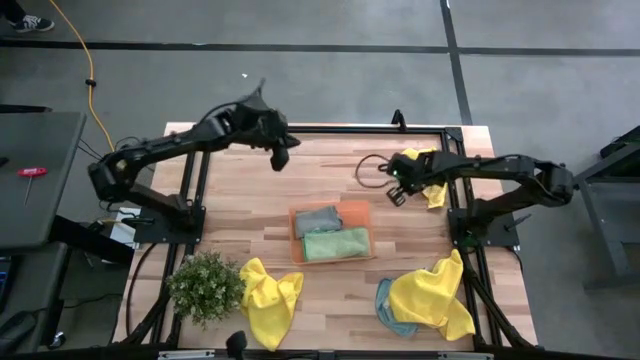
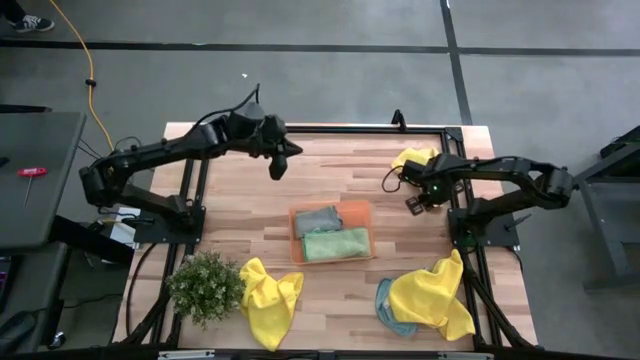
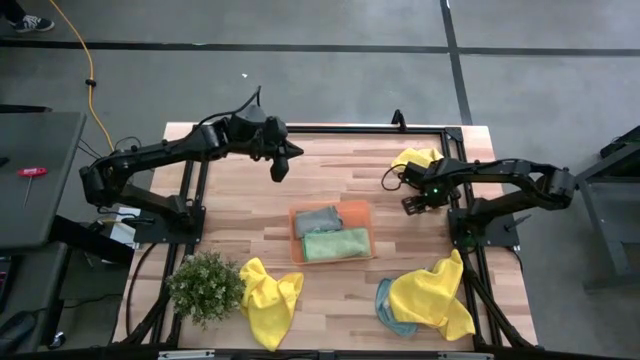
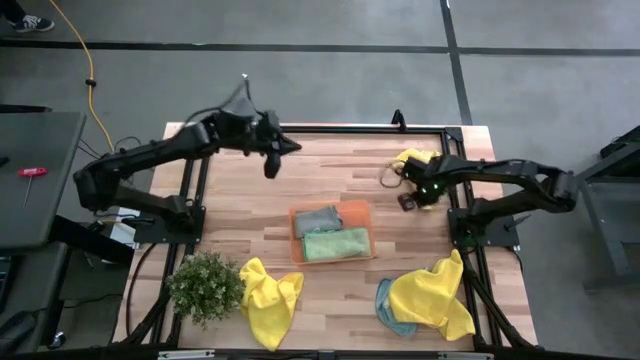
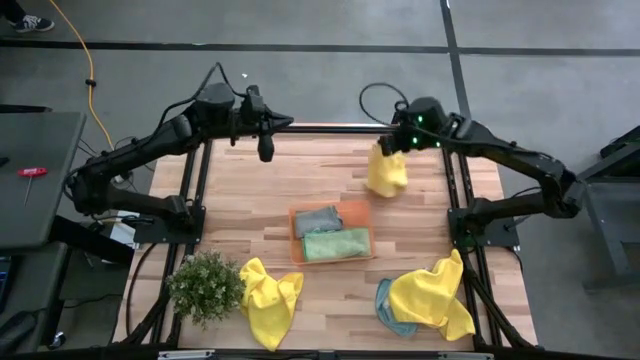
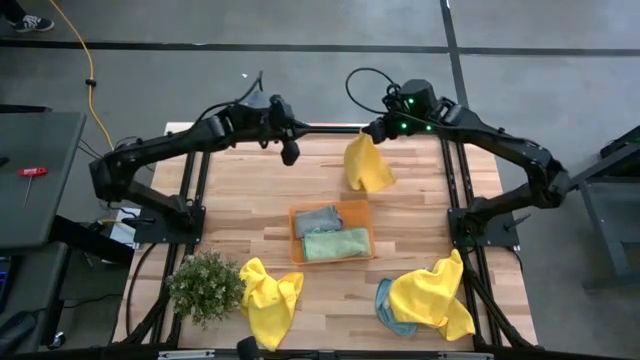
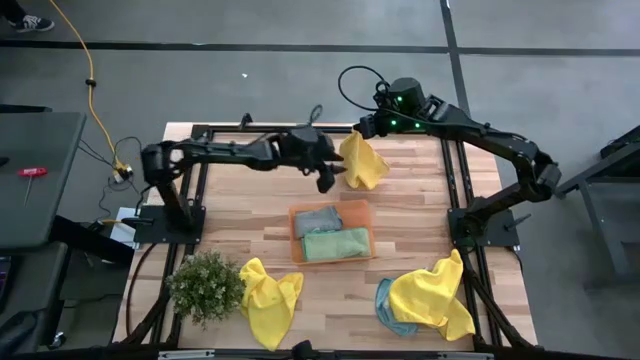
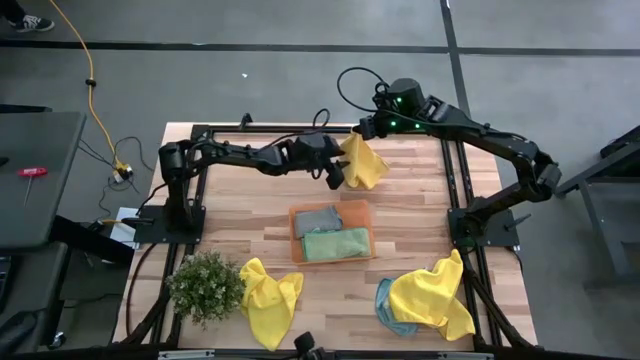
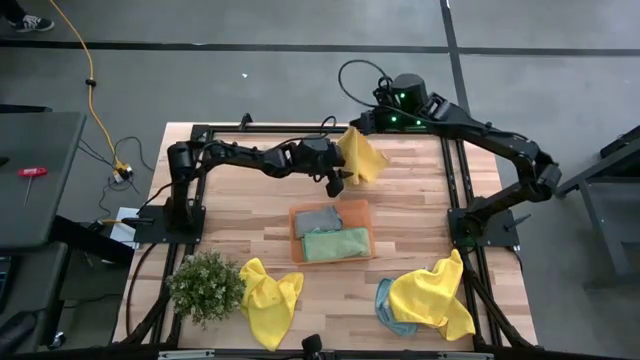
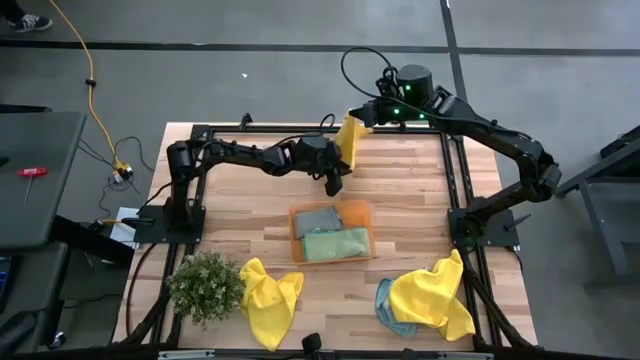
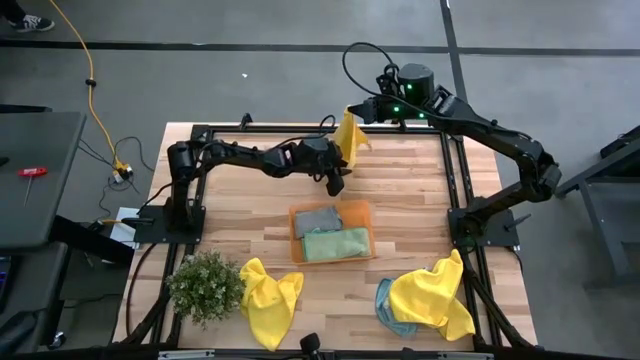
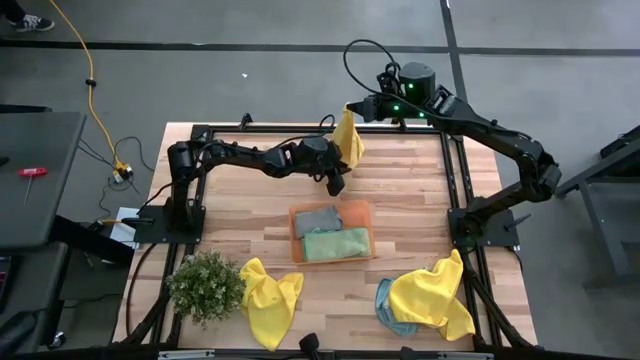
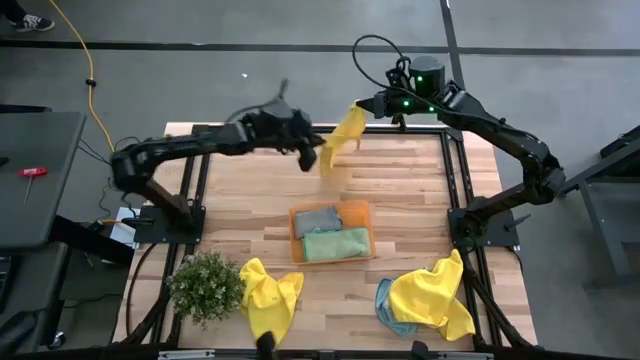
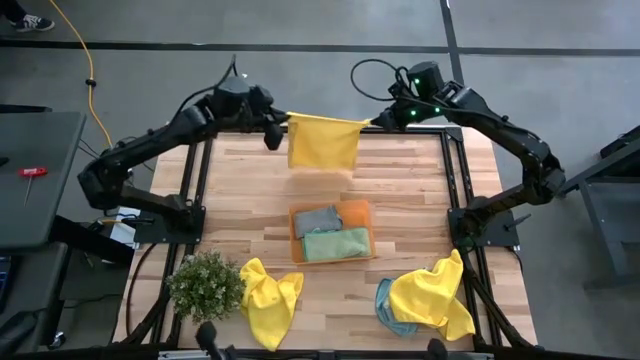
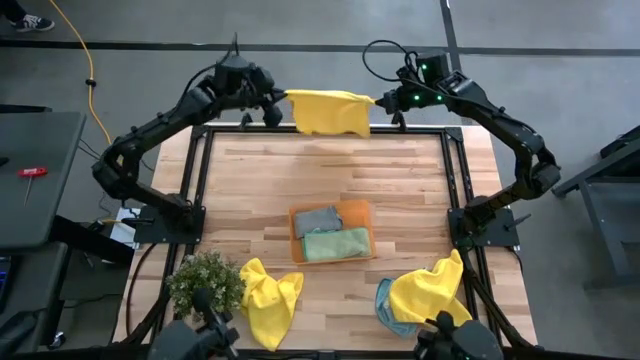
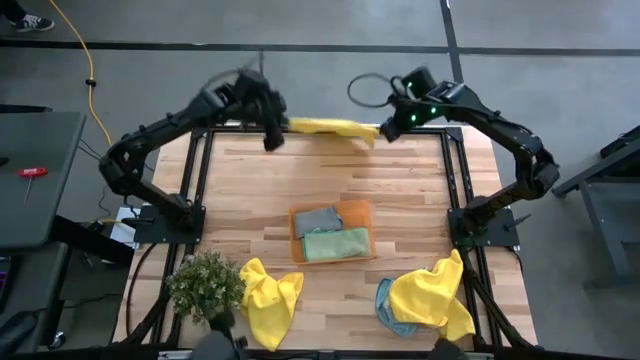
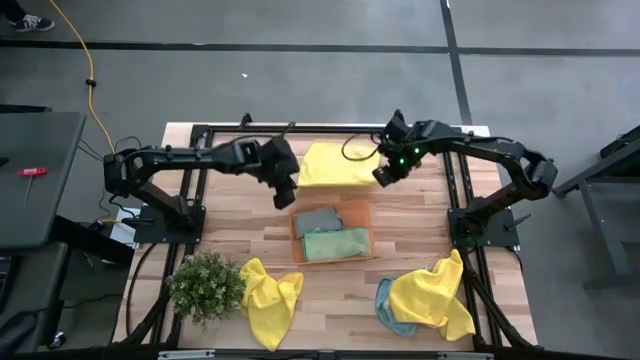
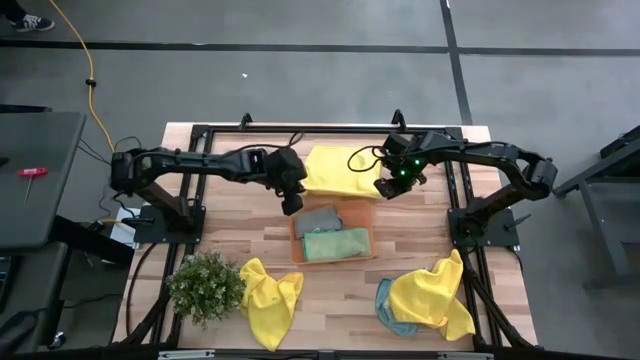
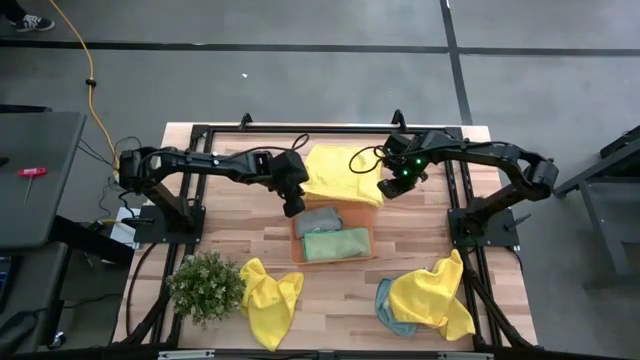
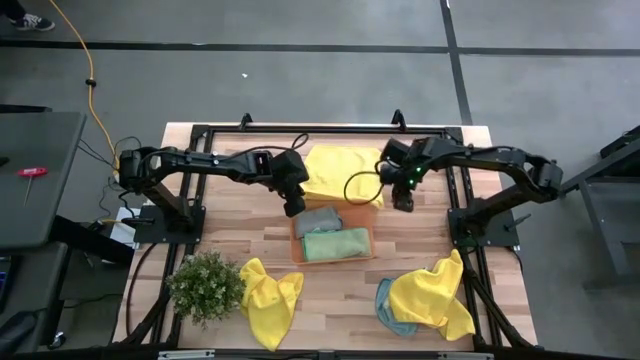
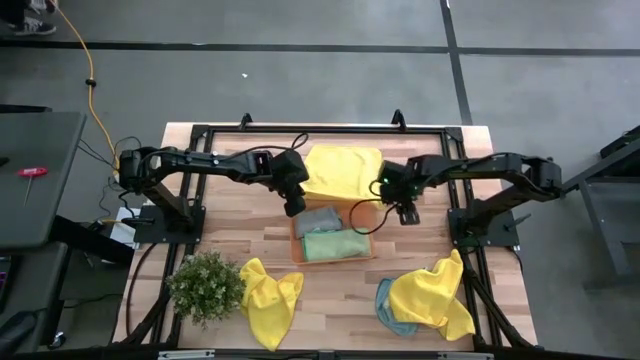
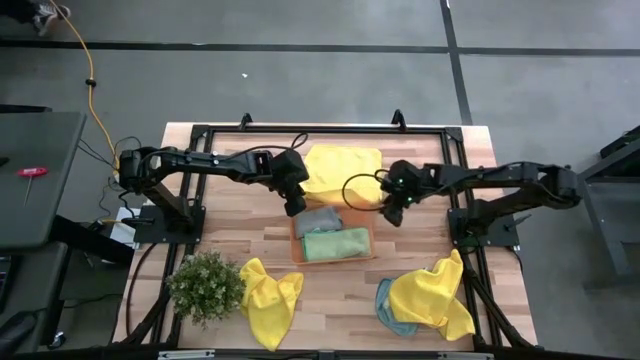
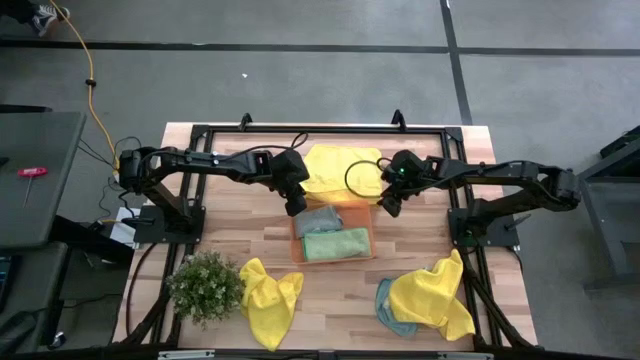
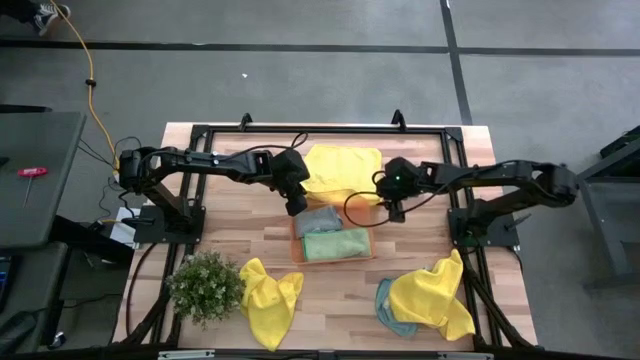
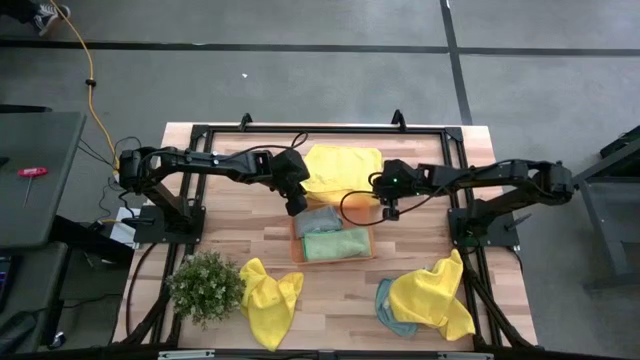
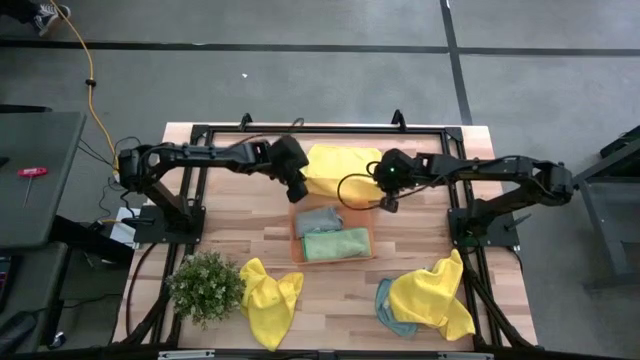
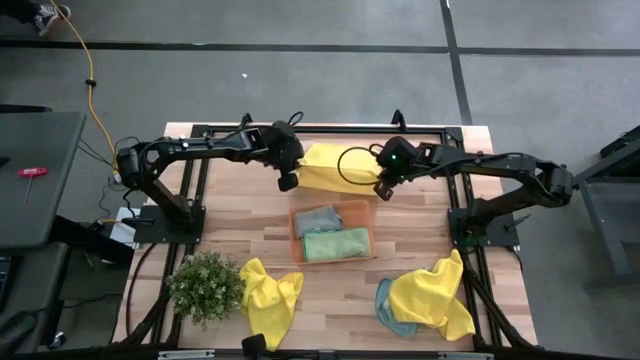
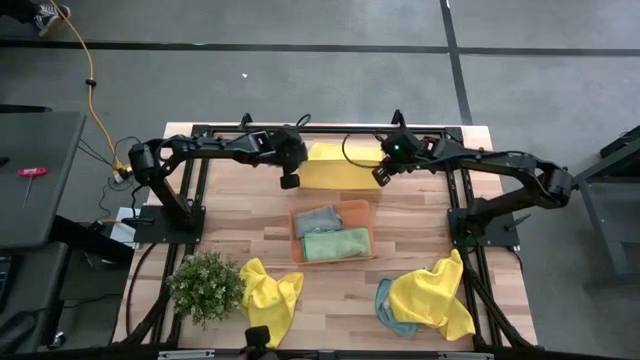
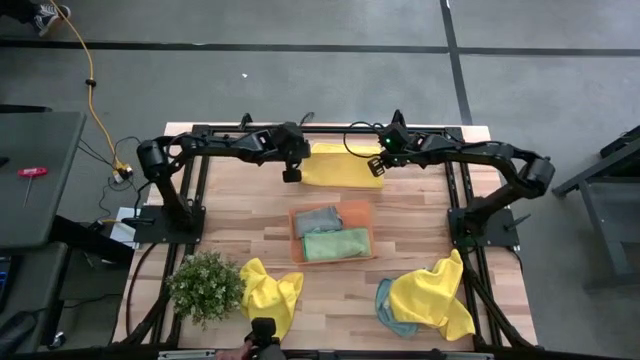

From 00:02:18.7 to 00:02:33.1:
Task: Fold microfiber towels
Fold the top right yellow microfiber towel

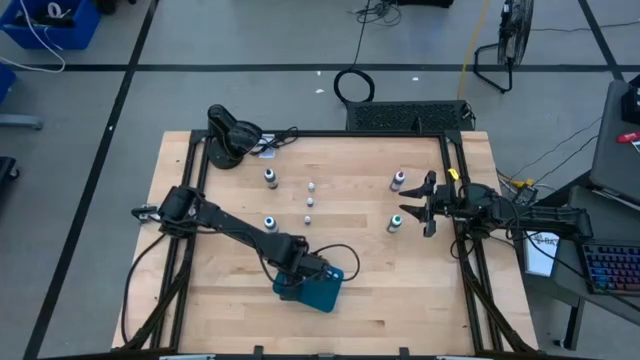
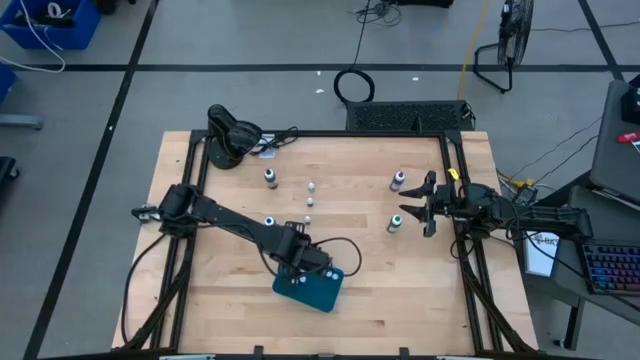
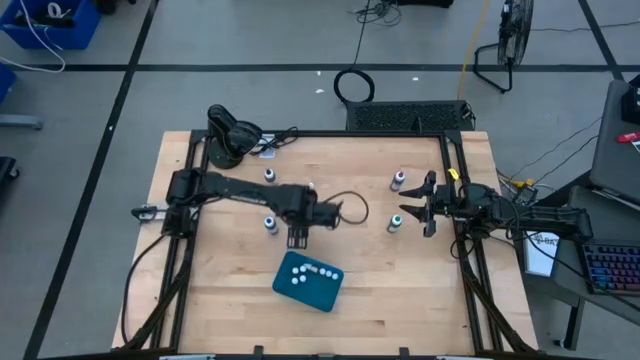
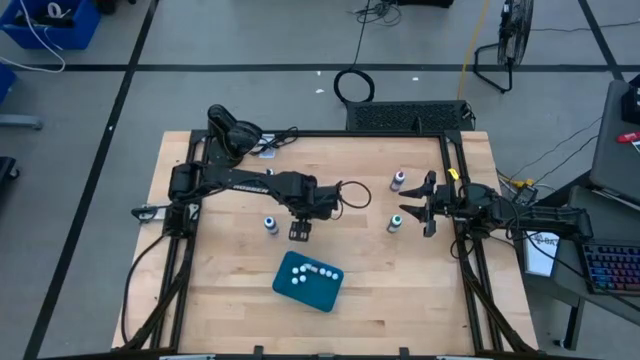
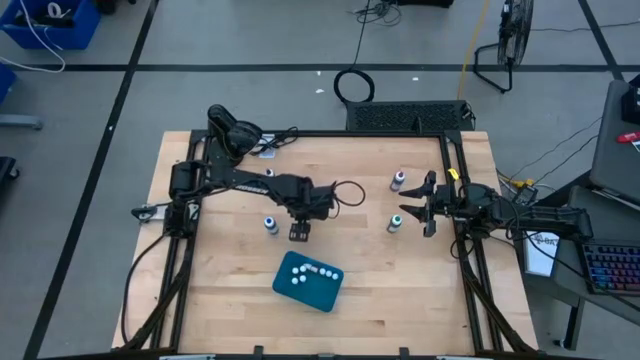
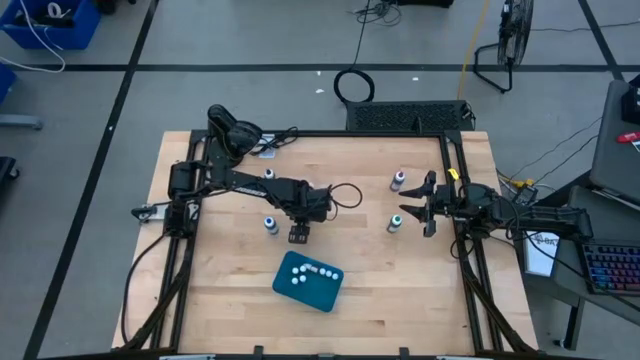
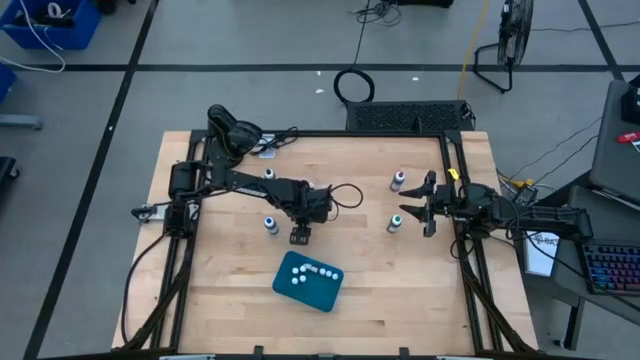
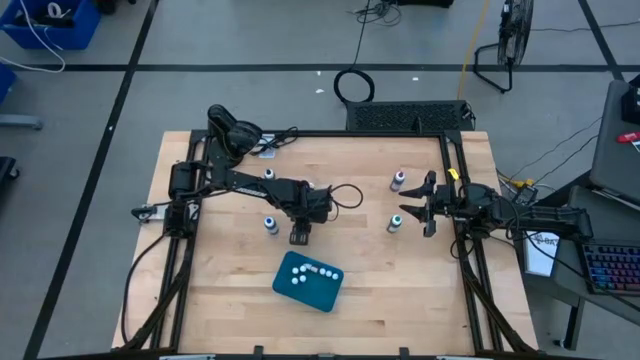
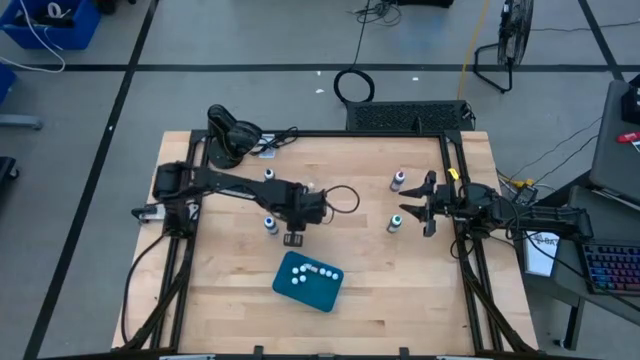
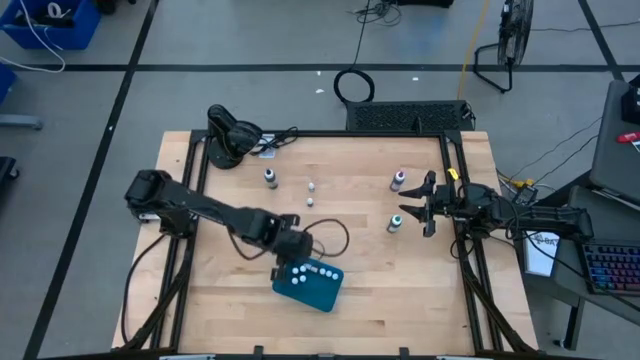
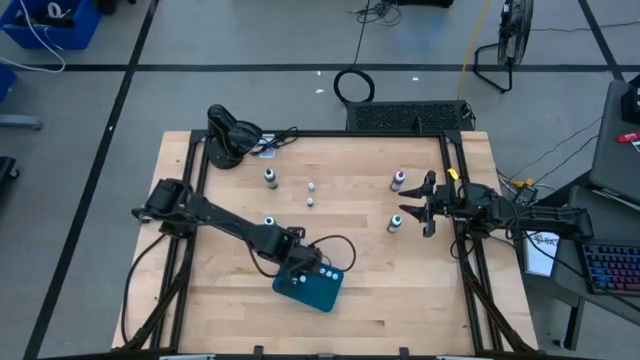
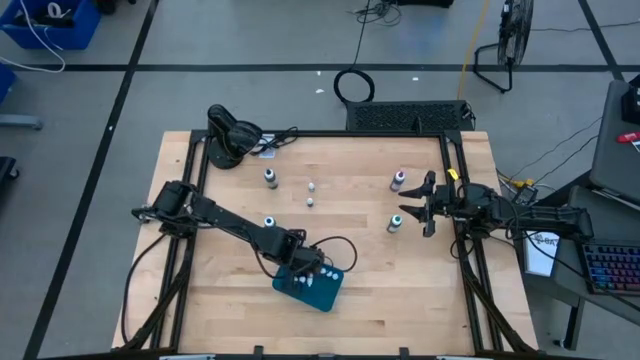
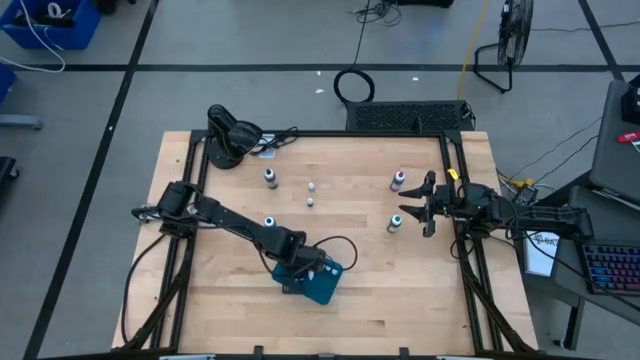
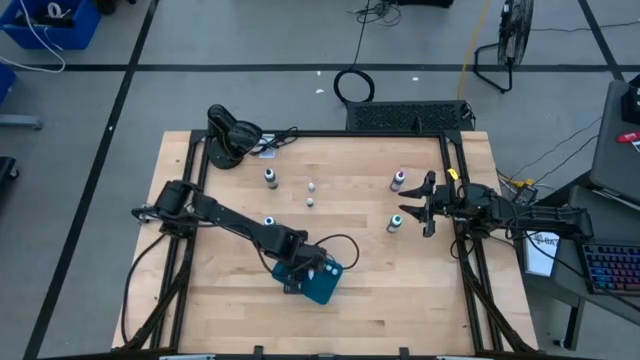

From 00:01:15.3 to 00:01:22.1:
Task: Pick & Place food coloring
Put the small green coloring bottle into the blue bin
